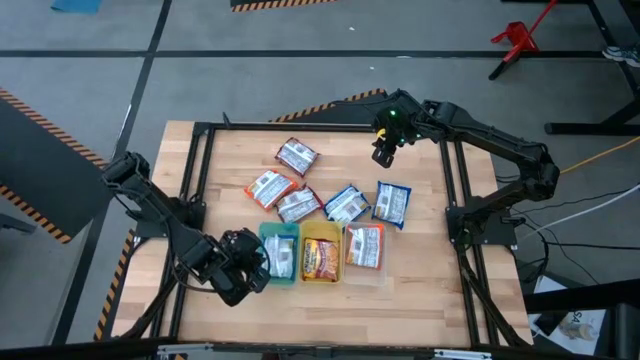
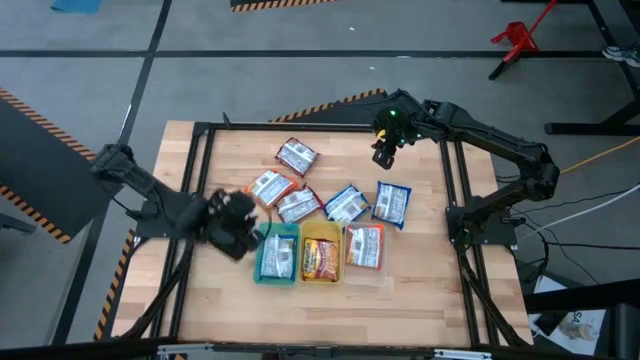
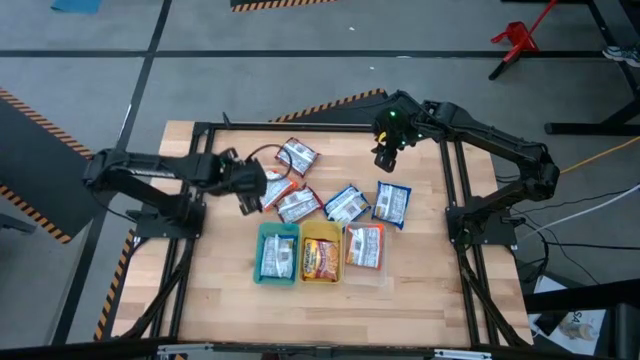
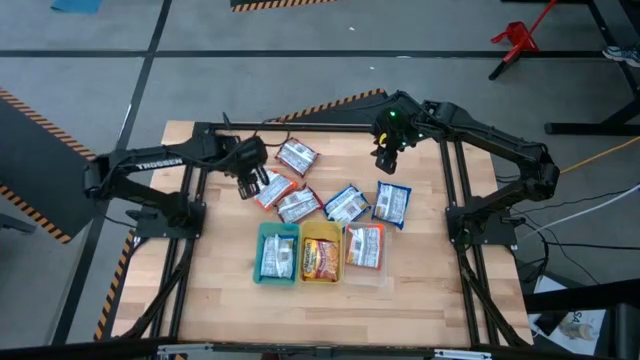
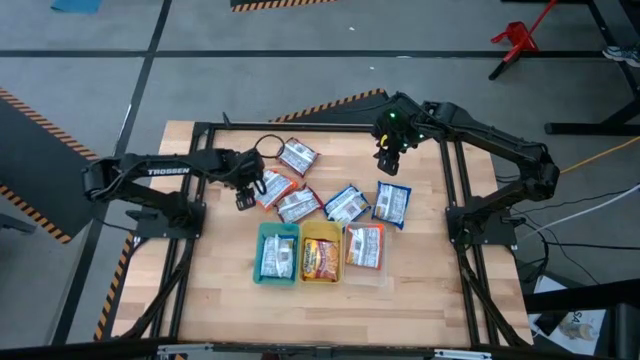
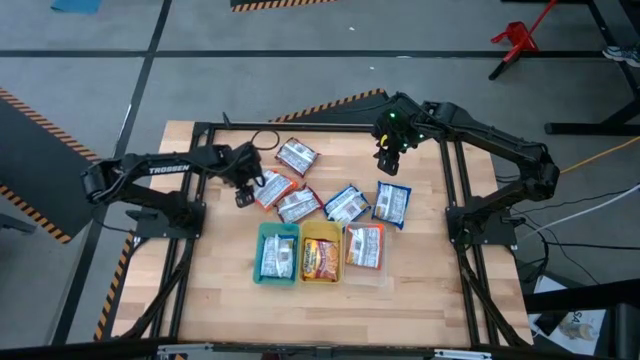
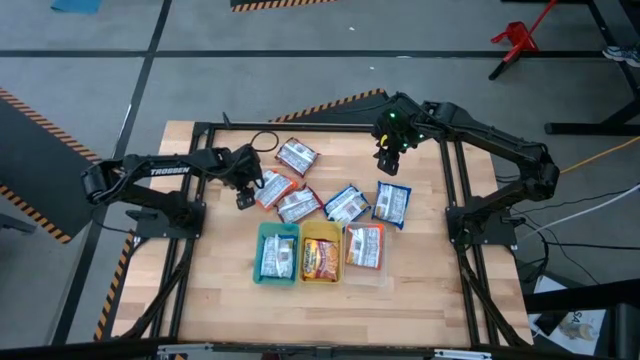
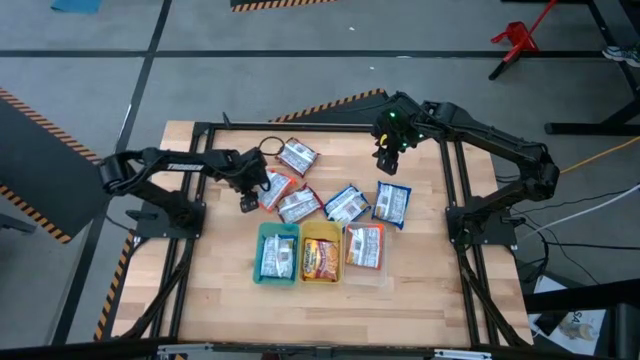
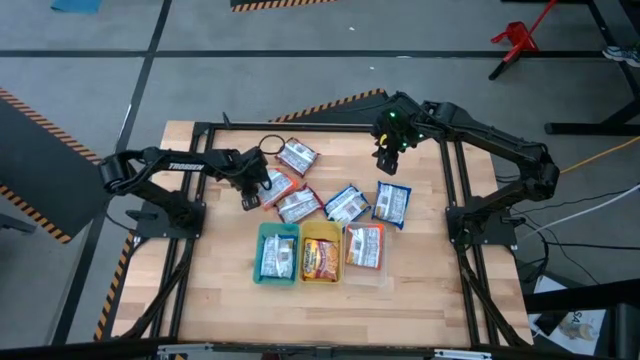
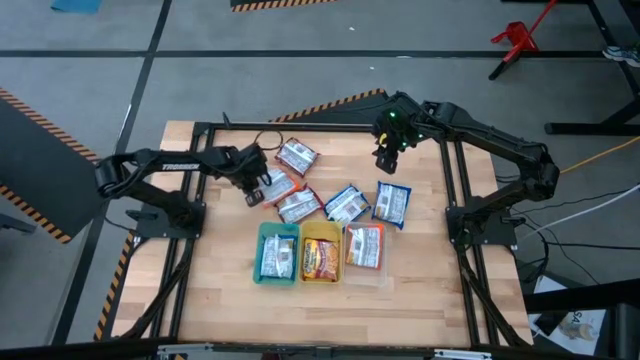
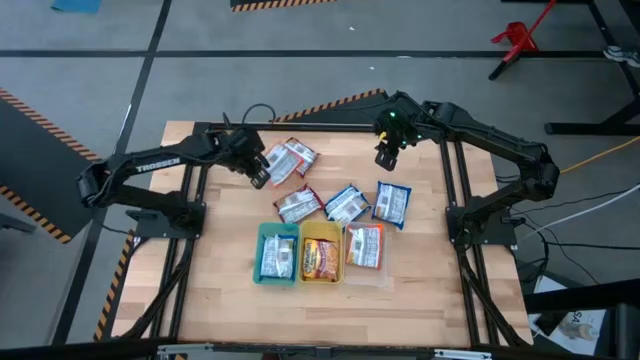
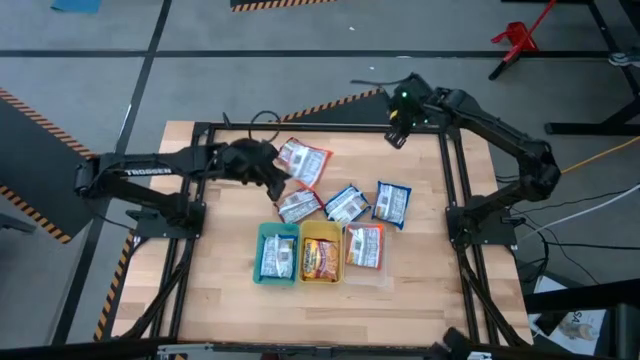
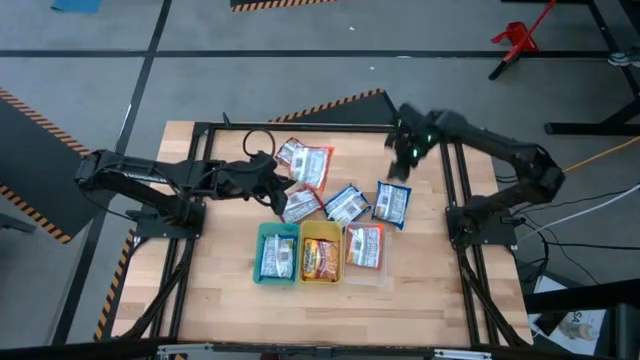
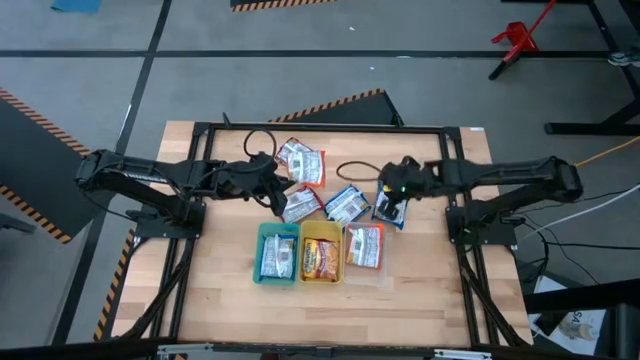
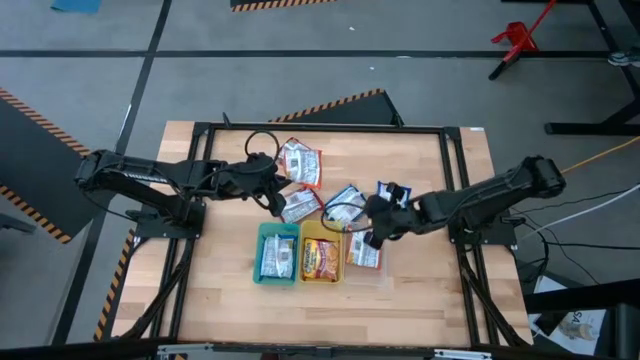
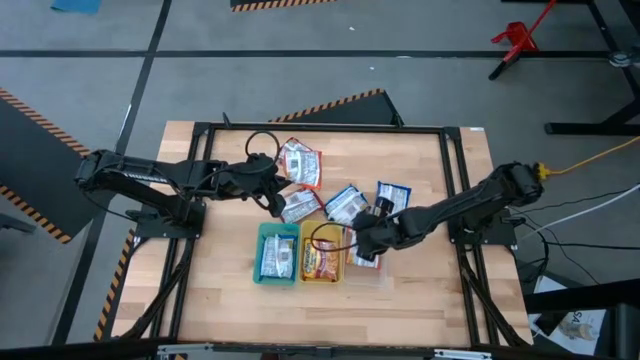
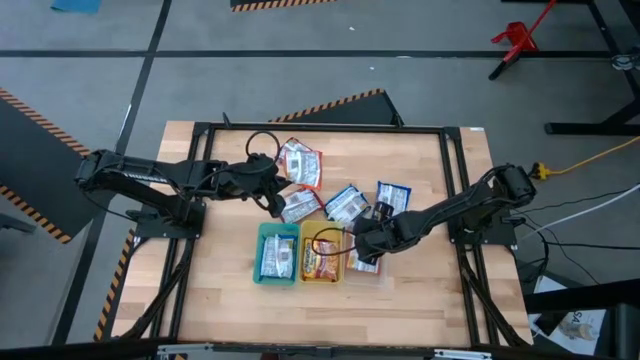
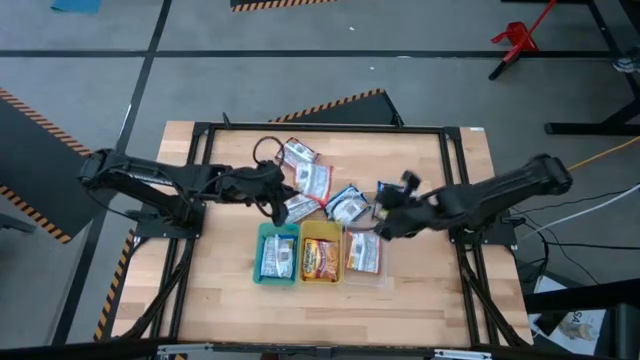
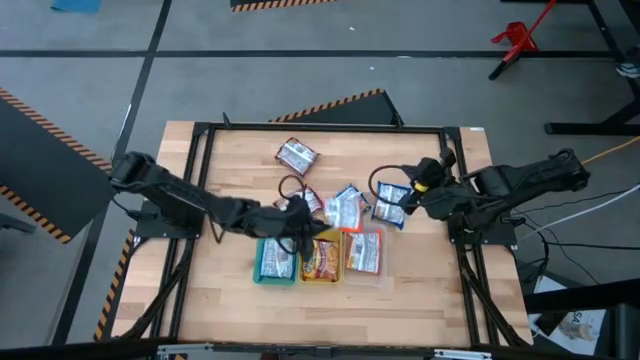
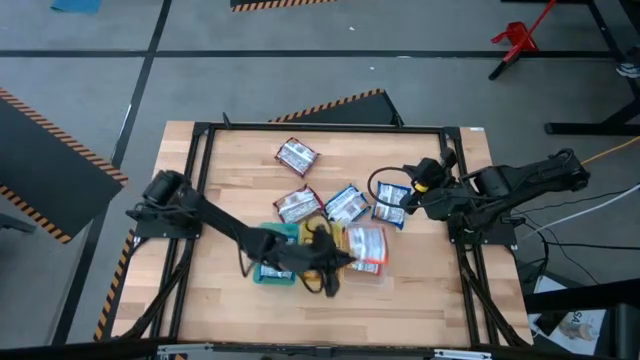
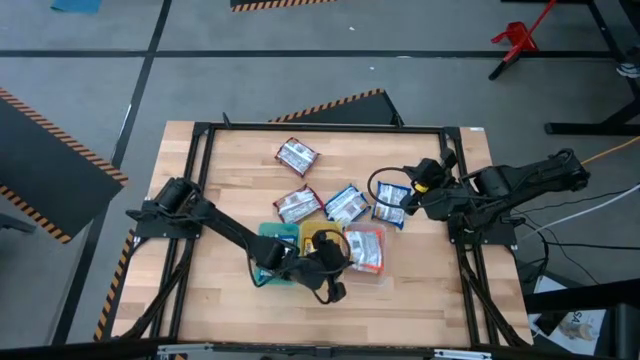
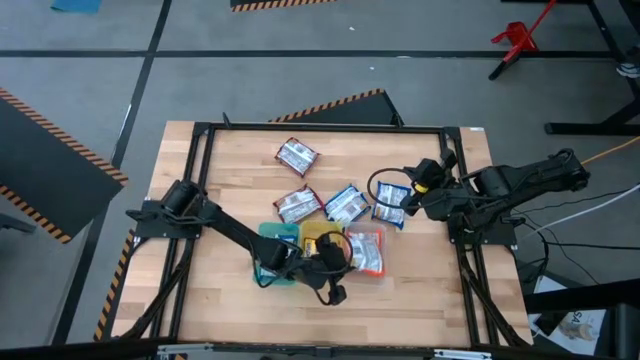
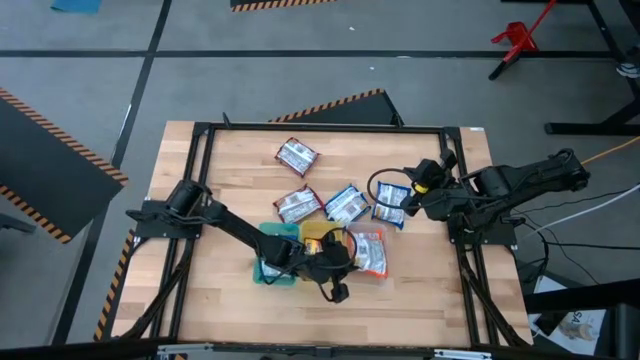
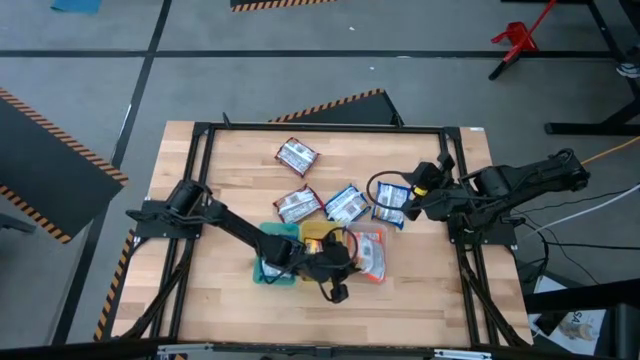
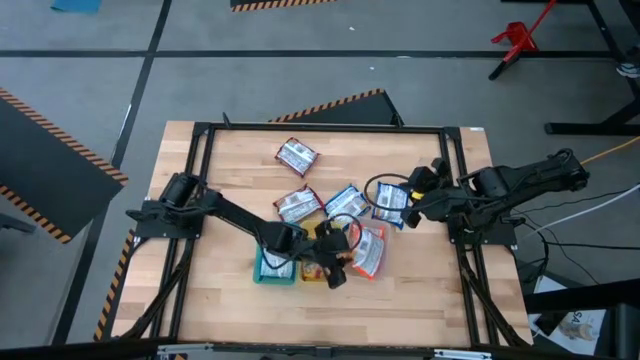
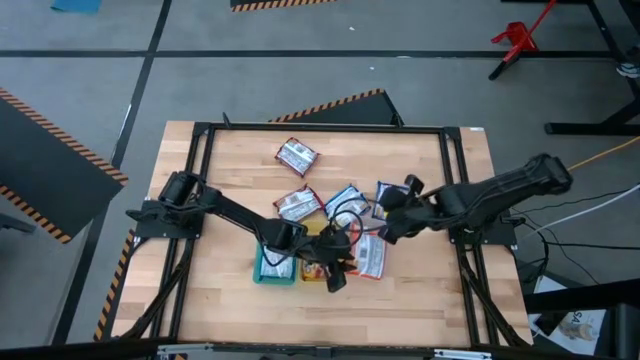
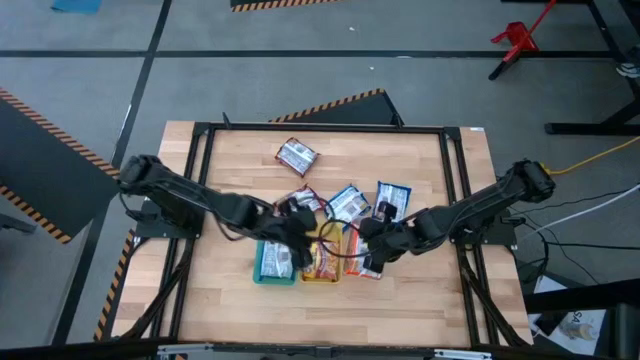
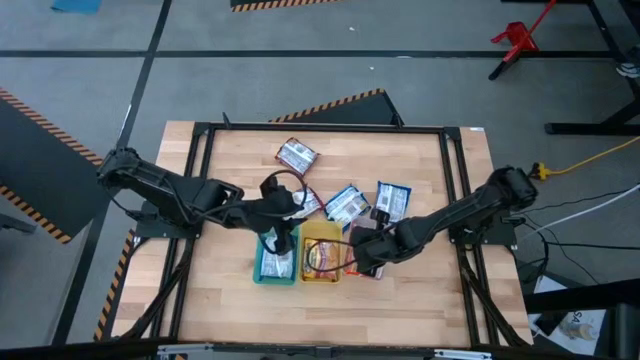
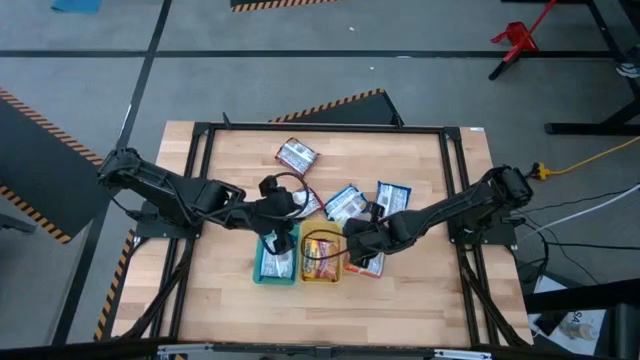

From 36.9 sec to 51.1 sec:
Task: Sort Maruchan noodles
Put the orange noodle pack into the transparent bin

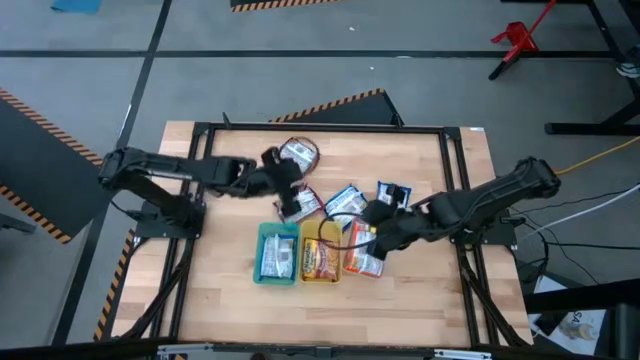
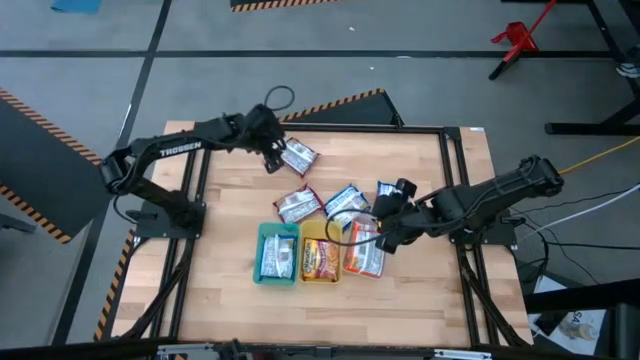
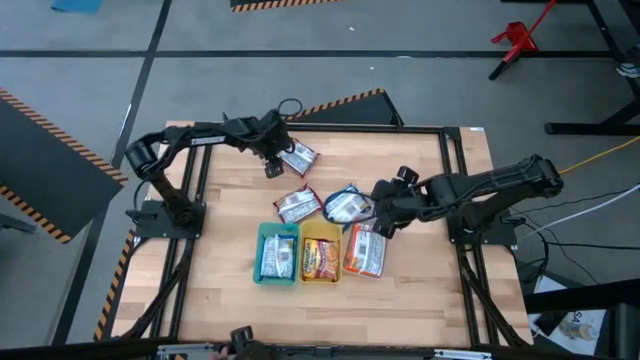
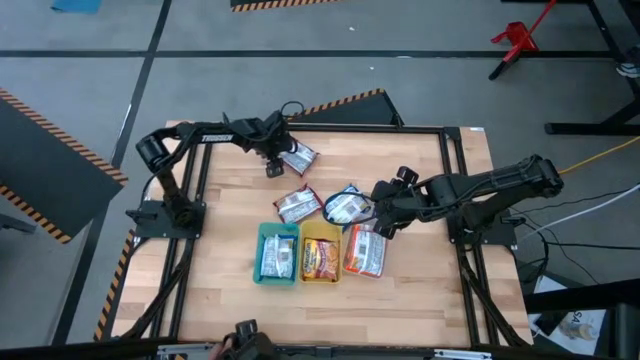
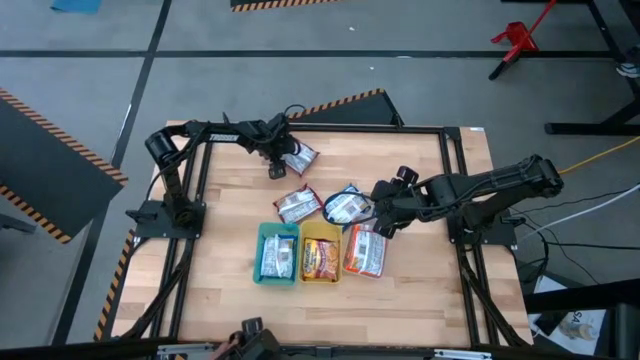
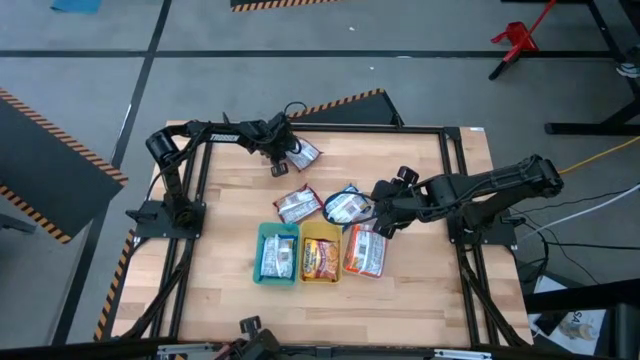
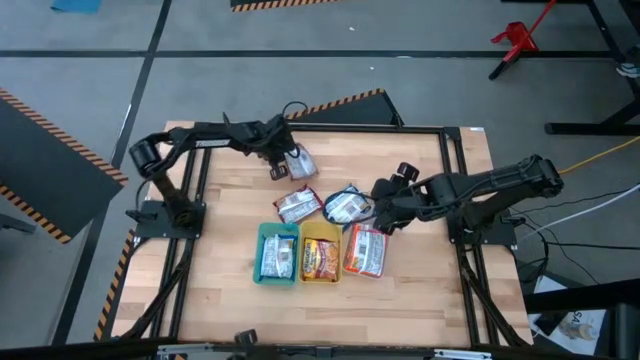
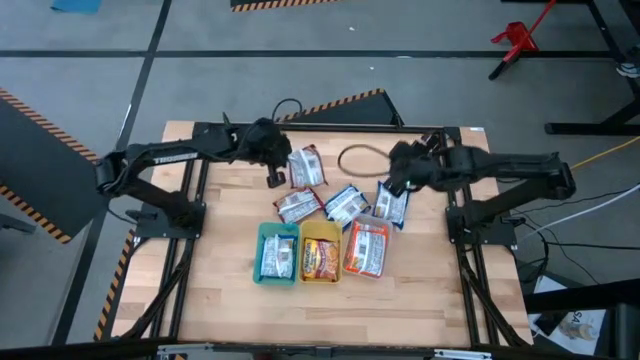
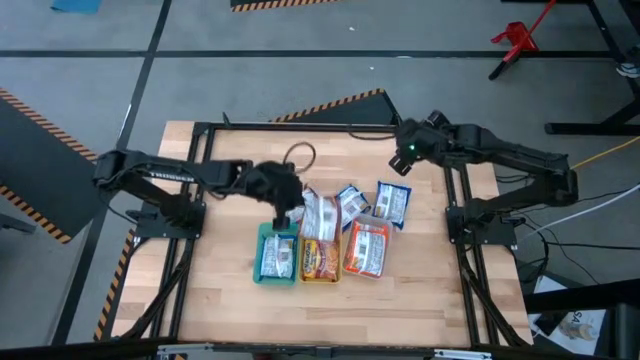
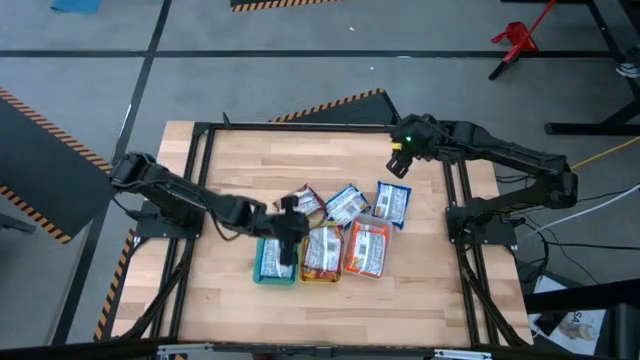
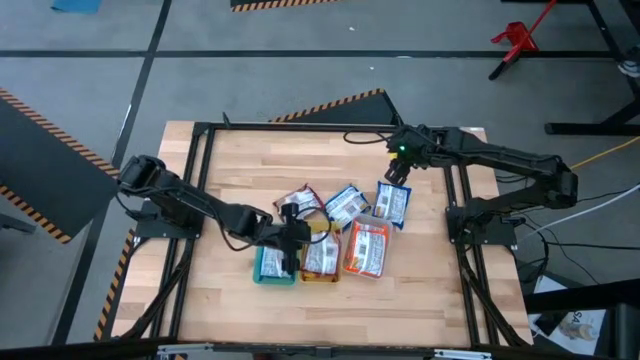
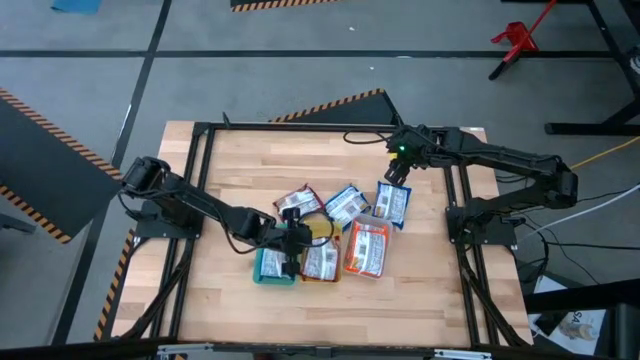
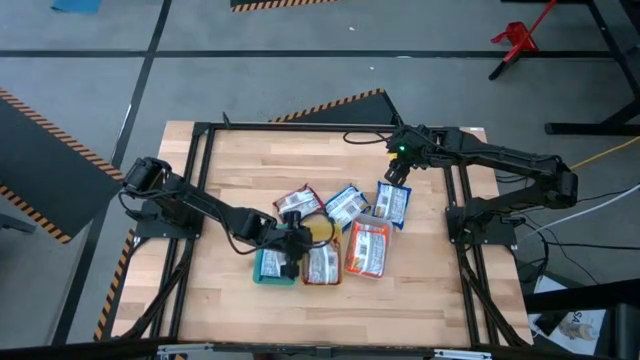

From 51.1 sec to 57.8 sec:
Put the top red noodle pack into the yellow bin

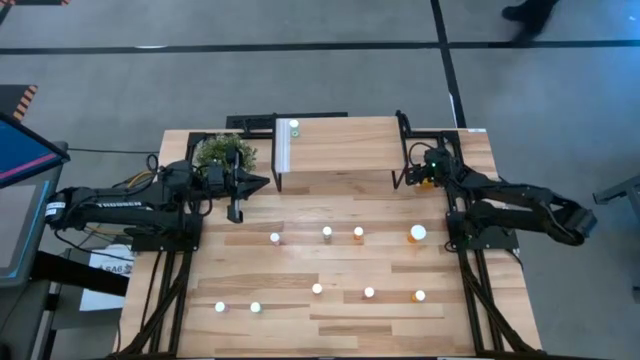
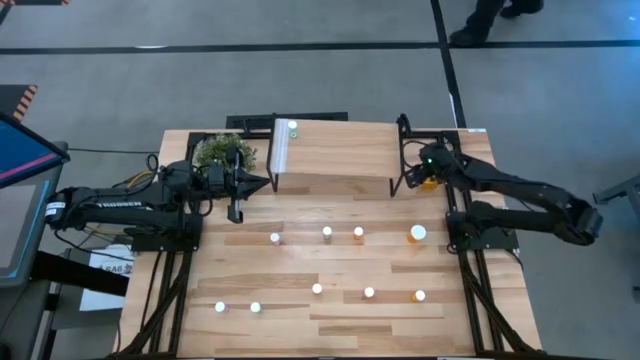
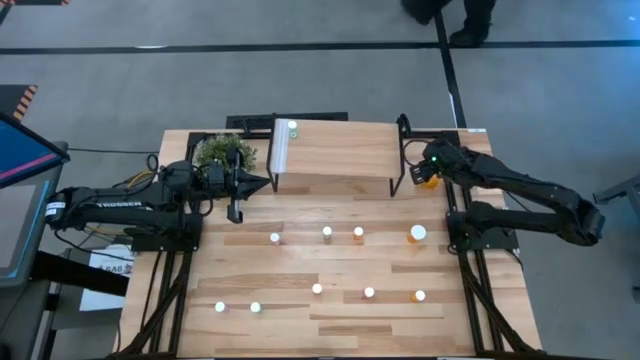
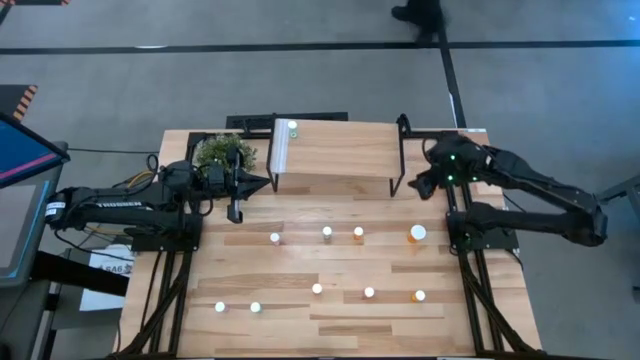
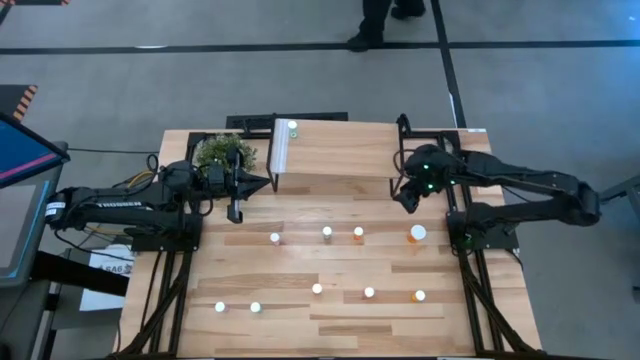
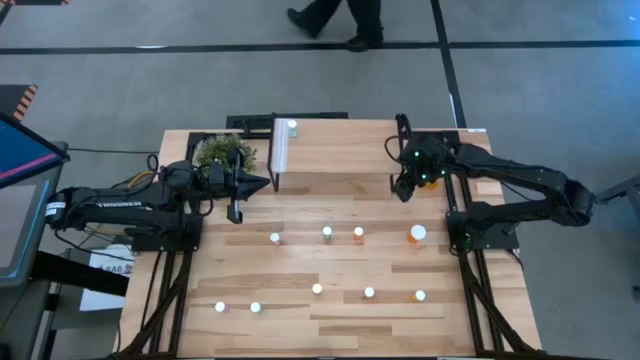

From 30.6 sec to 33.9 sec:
Task: Pick and place medicine bottles onto shelf by color
Adjust the shelf
